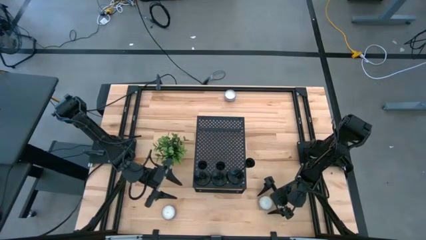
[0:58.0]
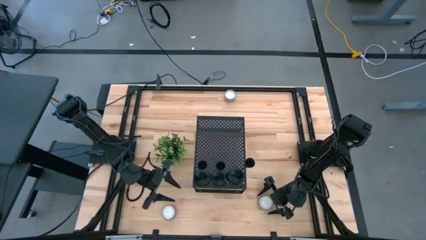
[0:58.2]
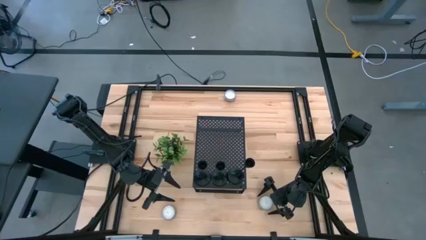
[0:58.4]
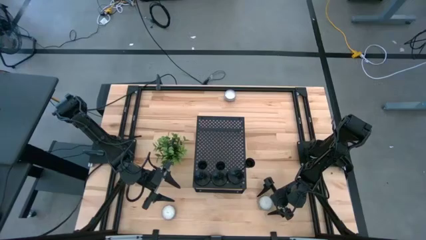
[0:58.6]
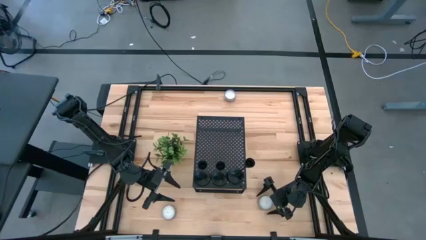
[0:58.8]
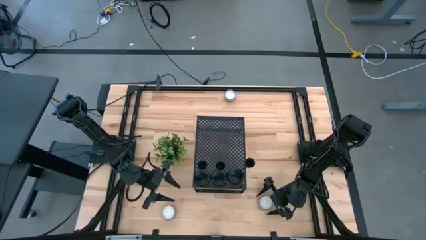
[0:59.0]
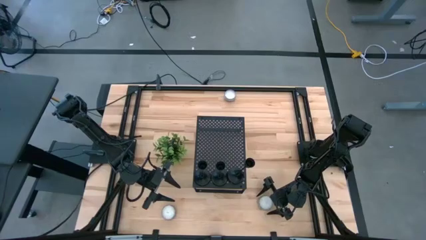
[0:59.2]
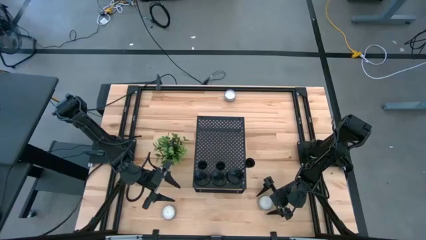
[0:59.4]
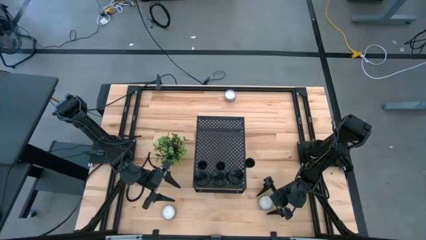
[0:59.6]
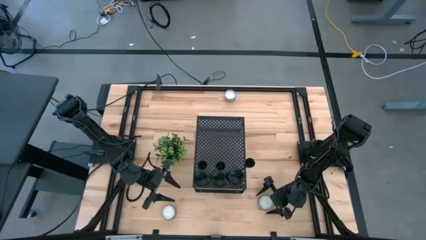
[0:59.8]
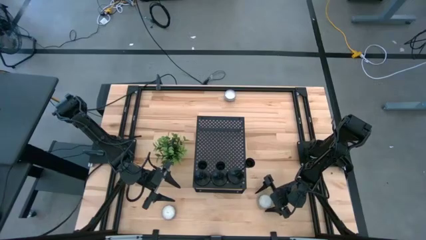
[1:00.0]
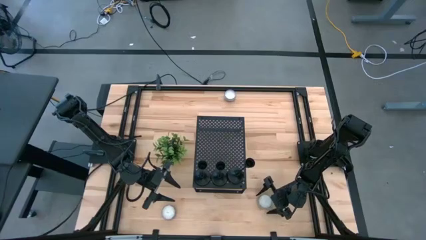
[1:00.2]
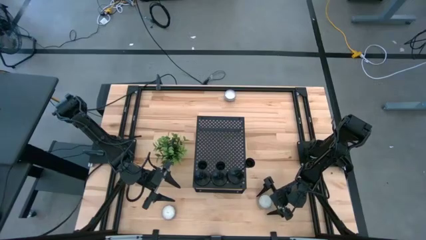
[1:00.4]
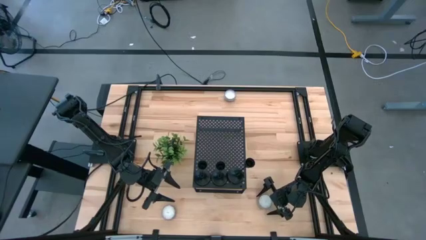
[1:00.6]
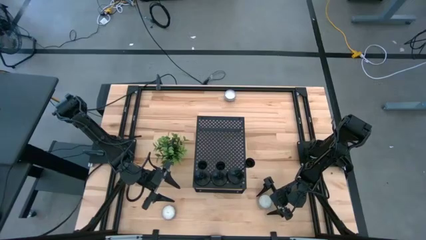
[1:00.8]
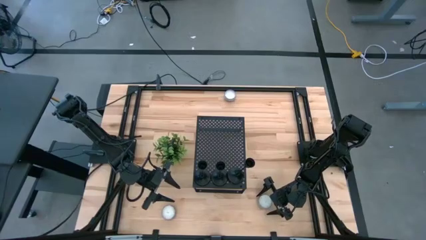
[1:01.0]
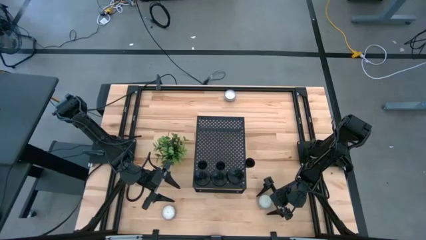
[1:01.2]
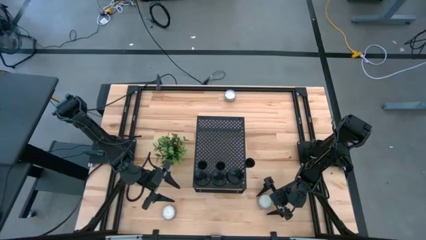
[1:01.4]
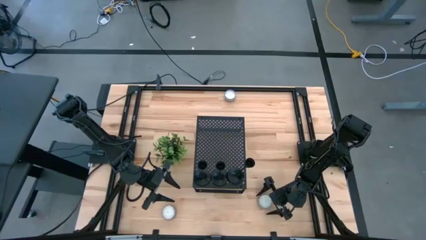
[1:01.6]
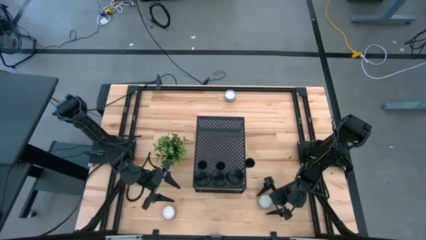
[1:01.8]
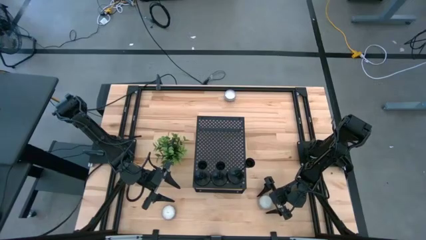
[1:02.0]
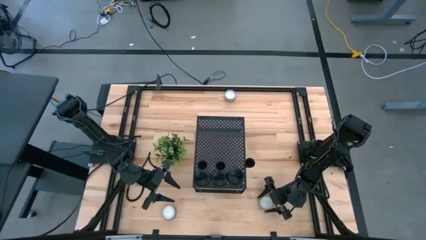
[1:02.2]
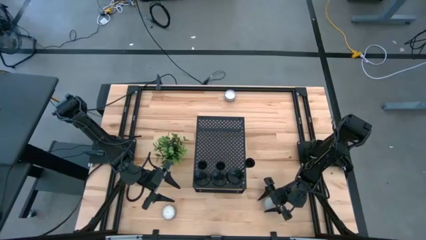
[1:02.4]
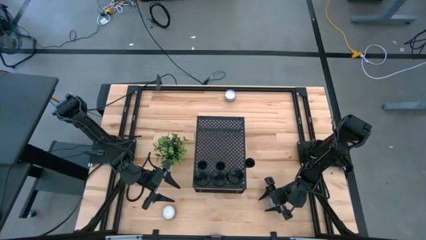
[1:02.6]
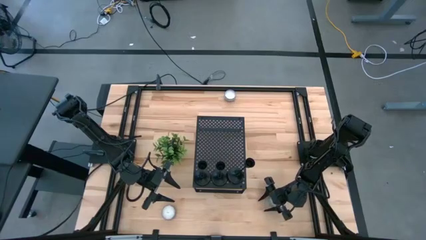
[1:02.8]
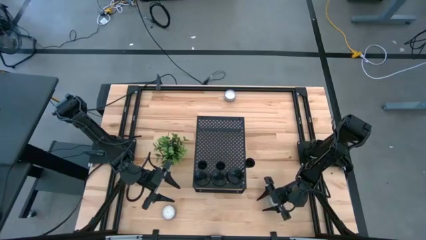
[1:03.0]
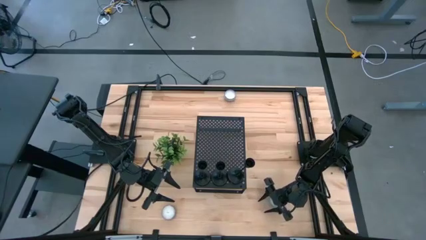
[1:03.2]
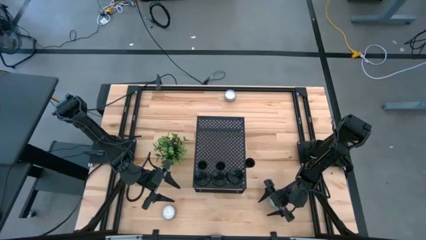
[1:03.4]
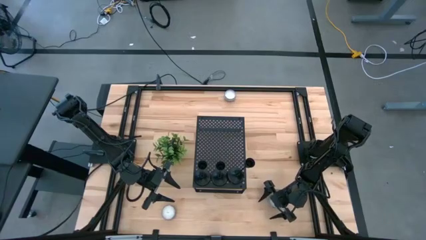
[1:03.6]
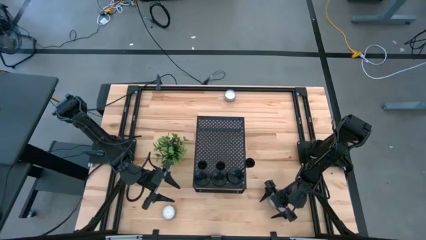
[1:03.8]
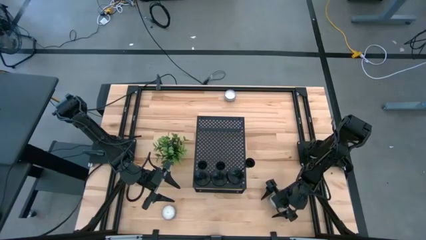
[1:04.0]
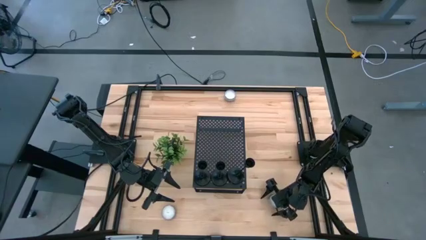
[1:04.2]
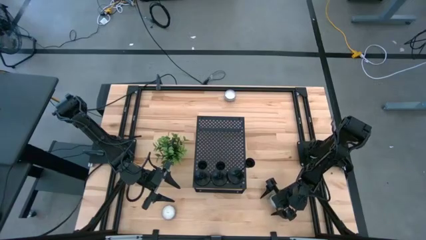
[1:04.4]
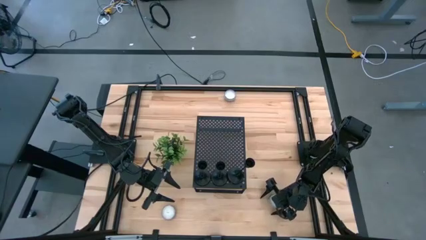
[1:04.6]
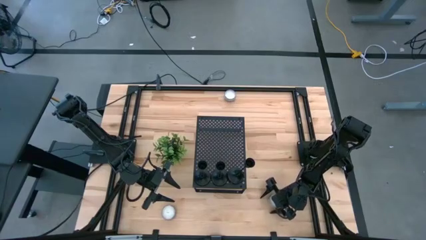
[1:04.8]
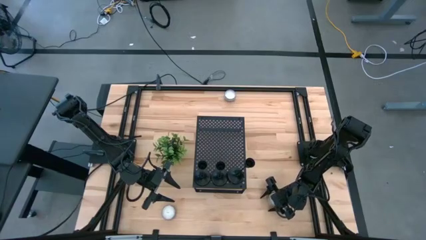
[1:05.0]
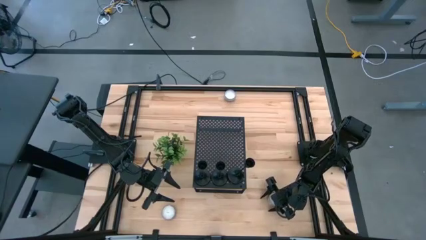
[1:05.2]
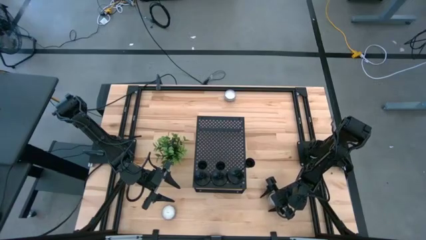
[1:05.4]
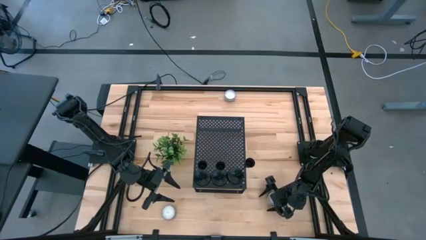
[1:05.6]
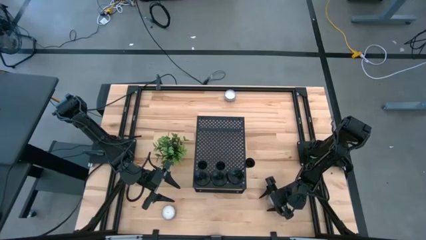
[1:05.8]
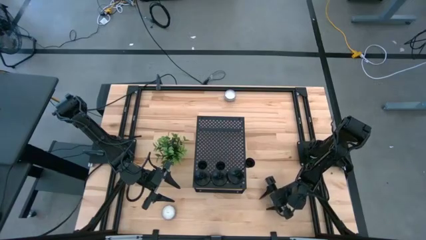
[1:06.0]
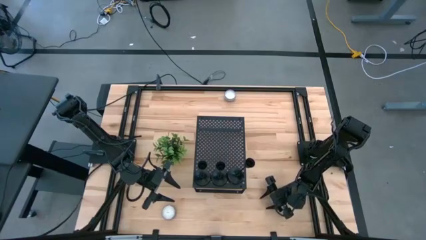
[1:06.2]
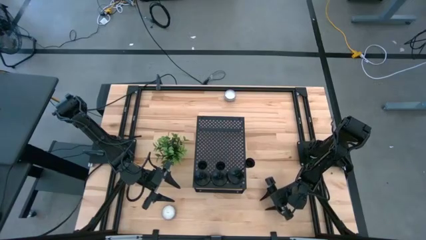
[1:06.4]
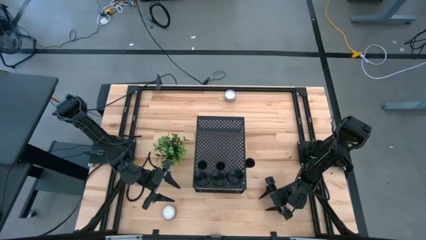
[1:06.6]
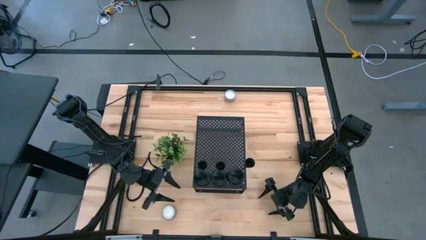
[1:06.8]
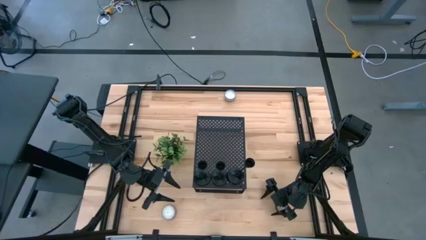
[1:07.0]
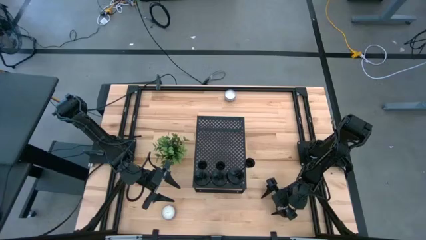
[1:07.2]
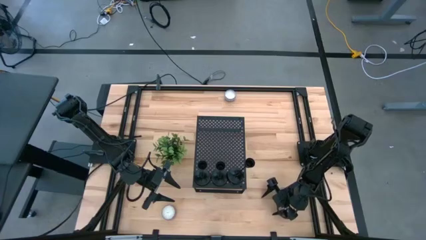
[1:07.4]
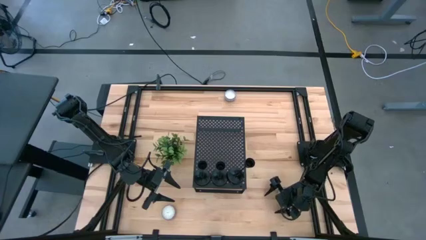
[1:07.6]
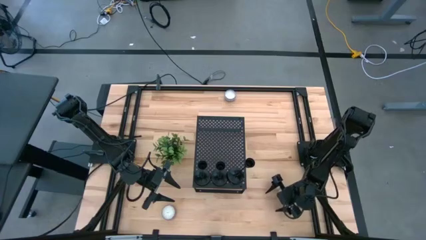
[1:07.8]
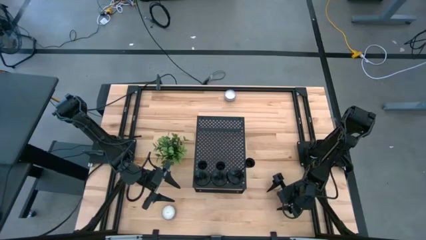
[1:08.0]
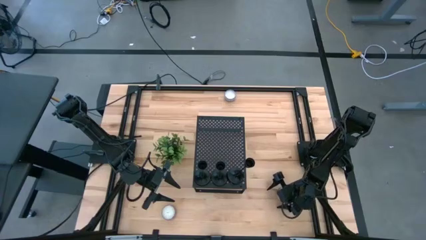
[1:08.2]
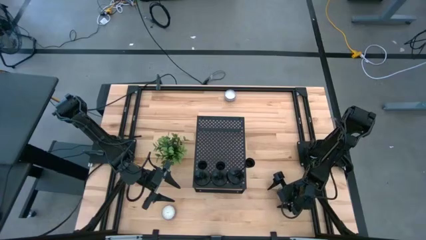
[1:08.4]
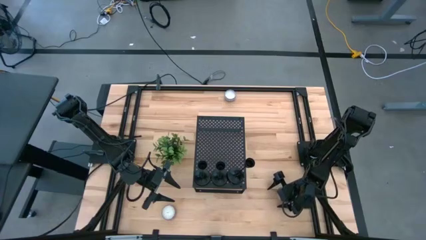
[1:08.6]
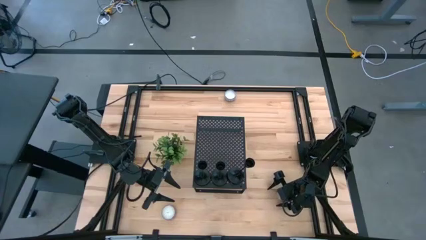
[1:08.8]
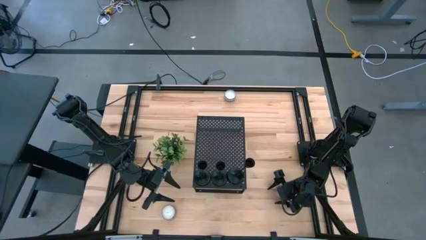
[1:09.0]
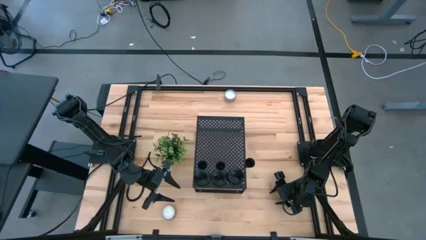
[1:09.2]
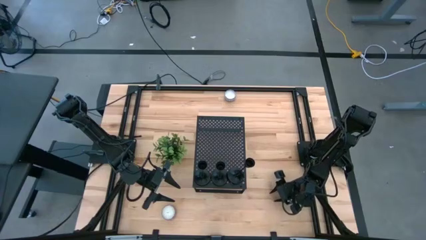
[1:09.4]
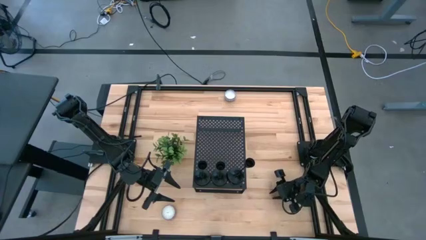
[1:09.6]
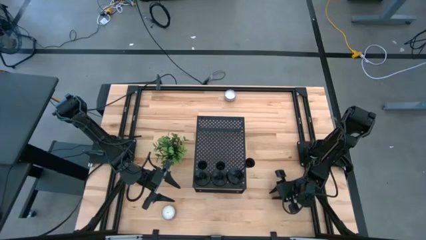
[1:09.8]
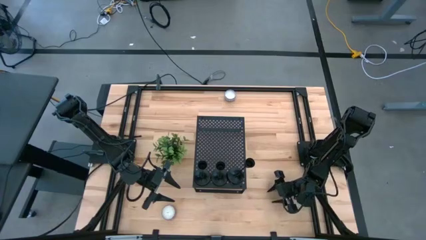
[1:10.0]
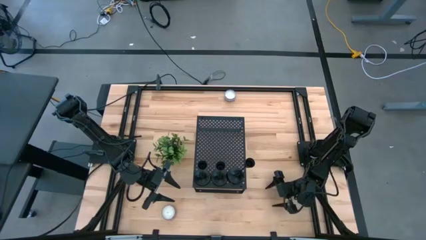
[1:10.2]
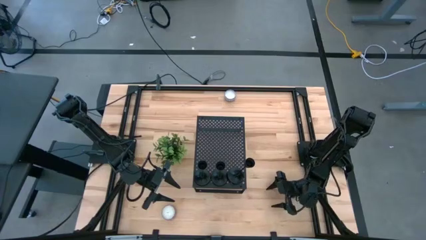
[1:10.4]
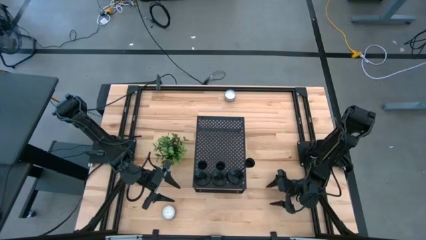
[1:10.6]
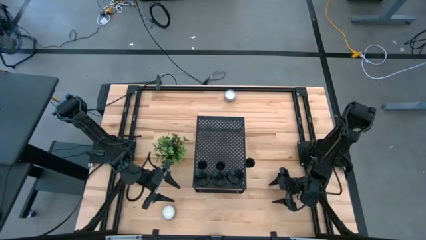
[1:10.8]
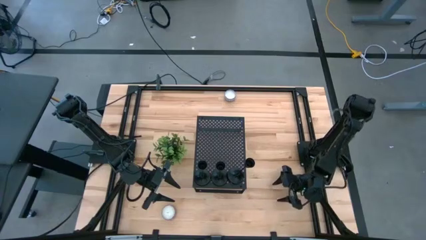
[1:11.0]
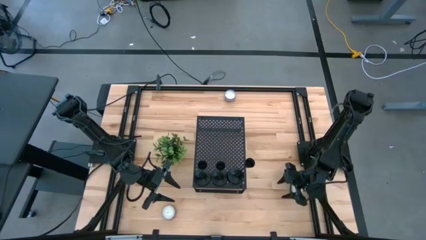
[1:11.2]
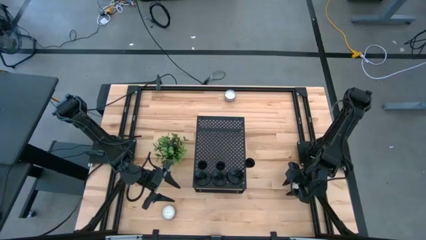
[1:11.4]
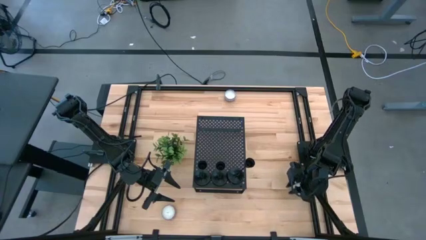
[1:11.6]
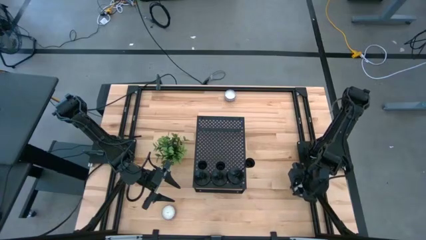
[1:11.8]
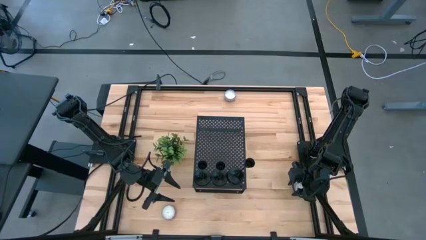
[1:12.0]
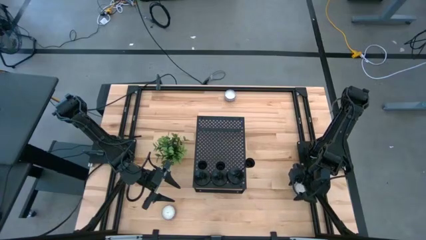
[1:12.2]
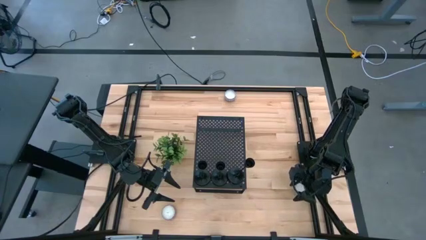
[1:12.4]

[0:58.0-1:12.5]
Task: Pick & Place candle stick holders
Put the blue patterned candle on the shelf

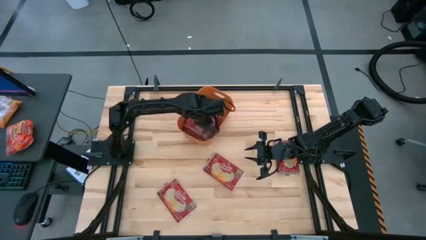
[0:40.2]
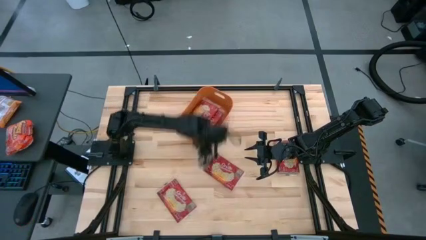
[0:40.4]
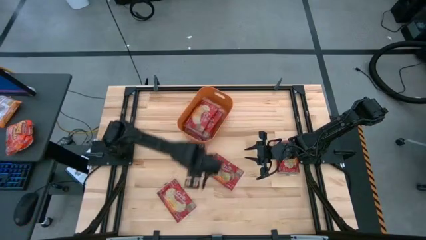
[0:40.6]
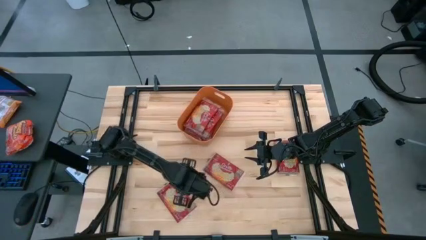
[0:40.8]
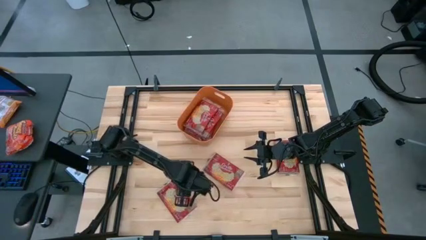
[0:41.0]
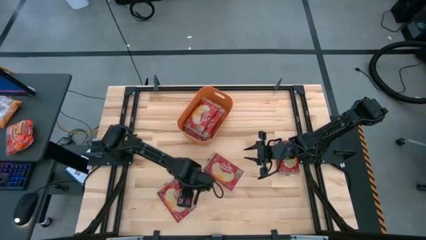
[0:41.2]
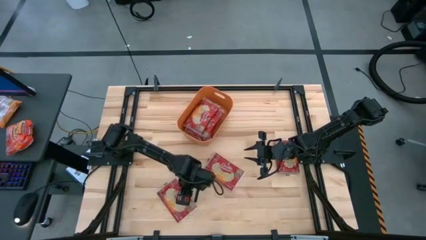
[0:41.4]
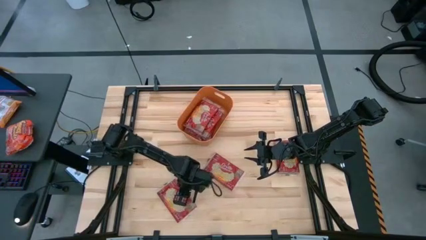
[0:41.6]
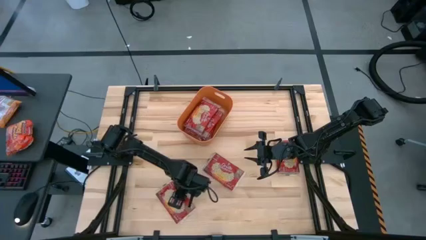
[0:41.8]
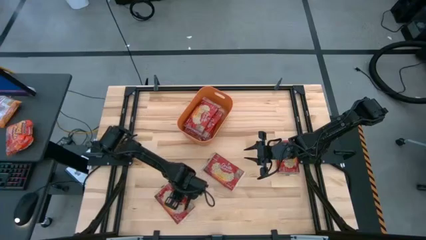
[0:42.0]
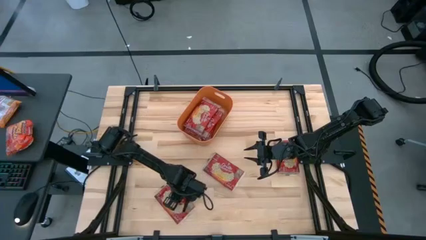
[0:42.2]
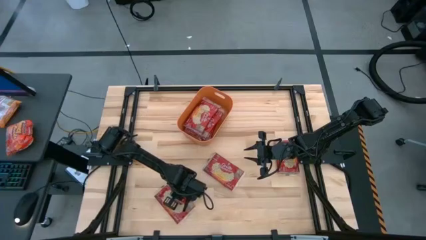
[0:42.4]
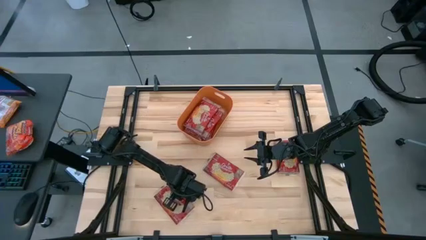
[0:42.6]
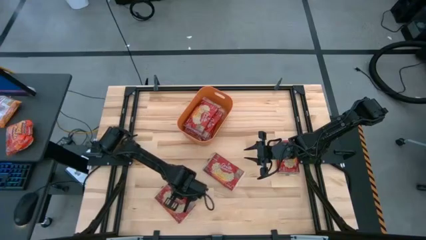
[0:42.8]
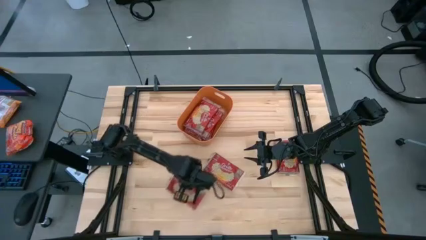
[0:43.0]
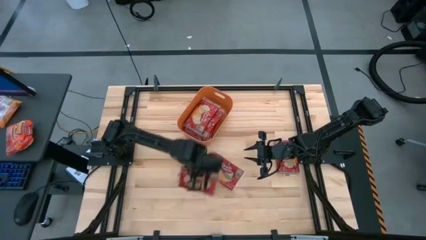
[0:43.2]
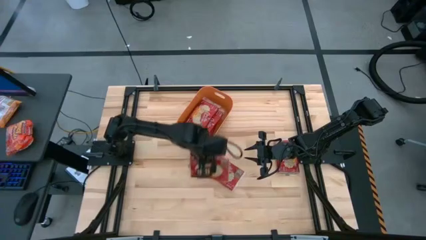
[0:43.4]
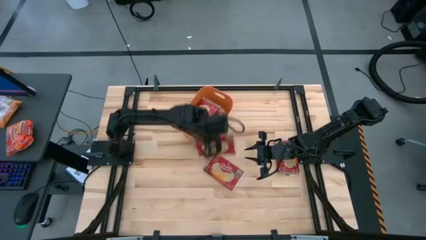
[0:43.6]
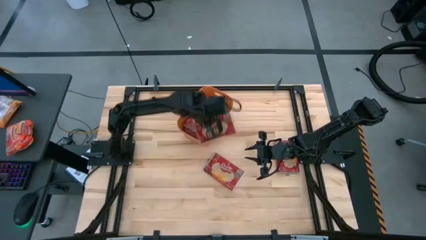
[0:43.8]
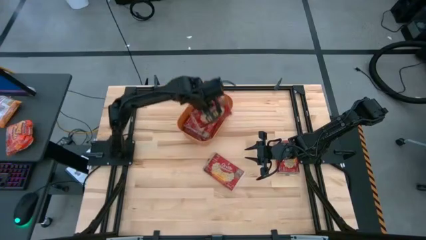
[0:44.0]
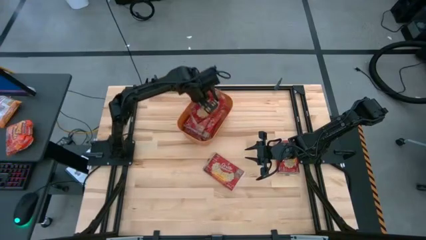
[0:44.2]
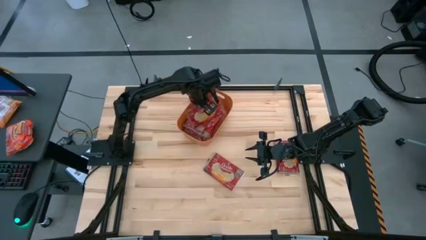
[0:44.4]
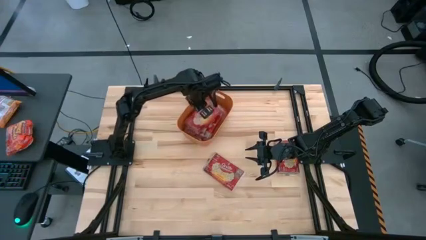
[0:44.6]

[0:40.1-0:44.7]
Task: Sort popcorn bags into baskets
Put the red popcorn bag into the orange bin
